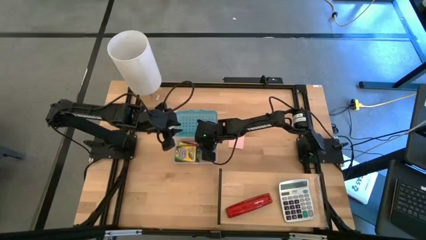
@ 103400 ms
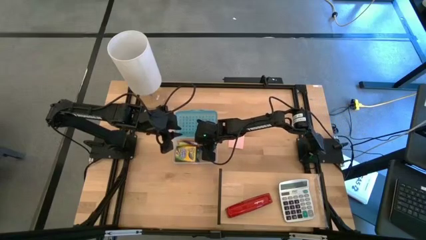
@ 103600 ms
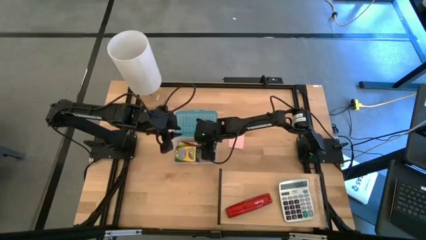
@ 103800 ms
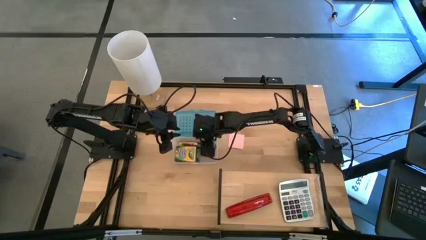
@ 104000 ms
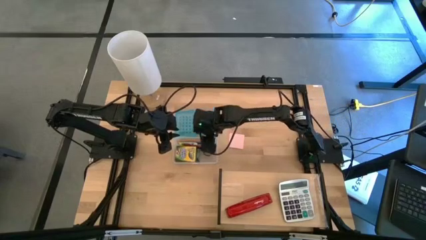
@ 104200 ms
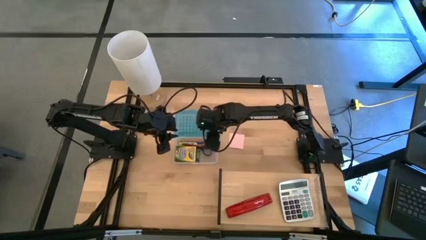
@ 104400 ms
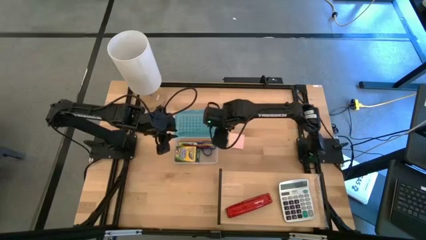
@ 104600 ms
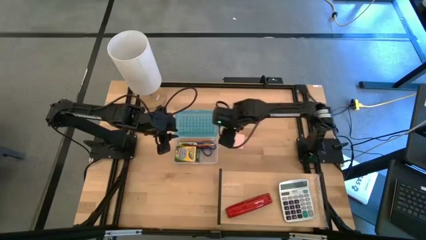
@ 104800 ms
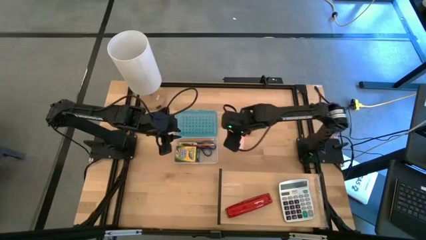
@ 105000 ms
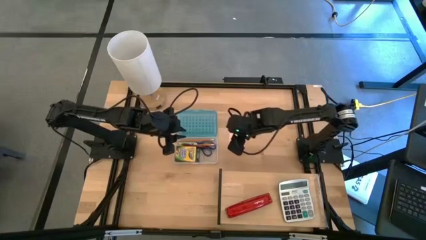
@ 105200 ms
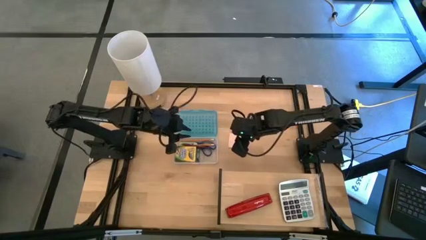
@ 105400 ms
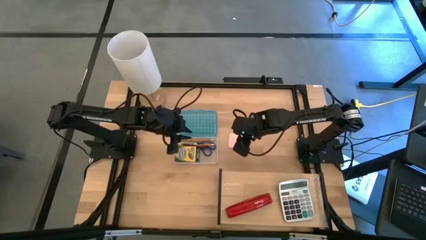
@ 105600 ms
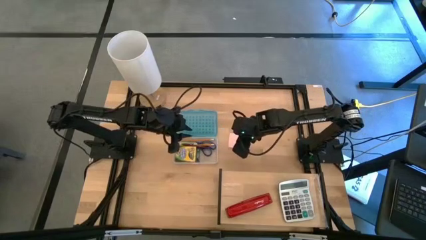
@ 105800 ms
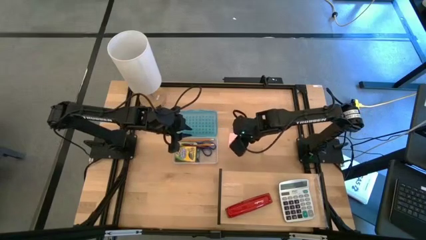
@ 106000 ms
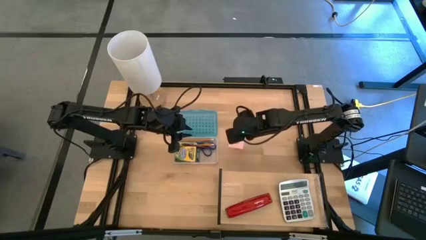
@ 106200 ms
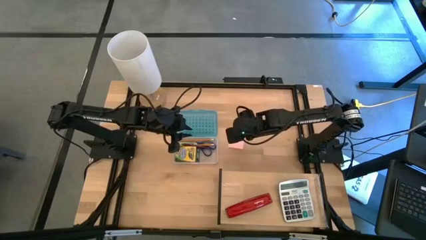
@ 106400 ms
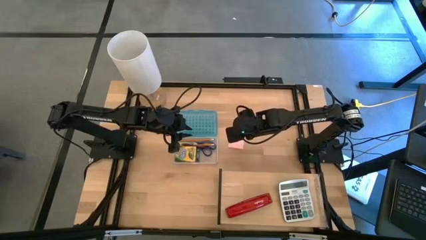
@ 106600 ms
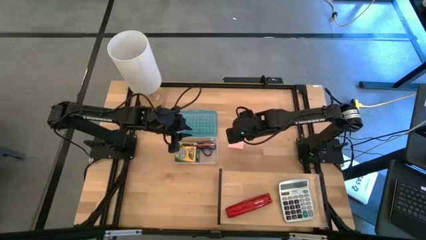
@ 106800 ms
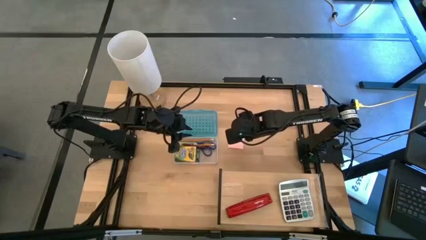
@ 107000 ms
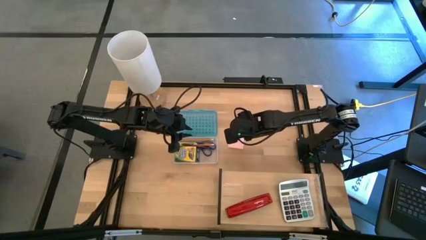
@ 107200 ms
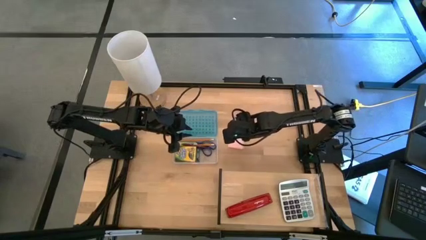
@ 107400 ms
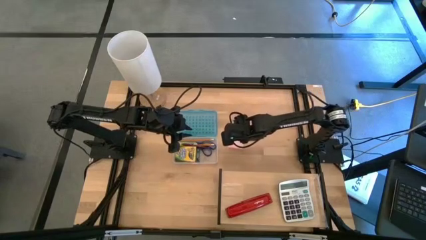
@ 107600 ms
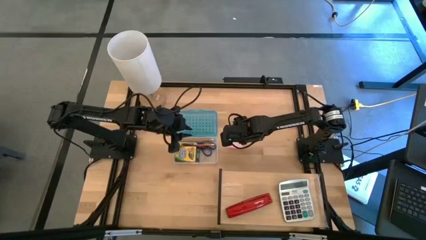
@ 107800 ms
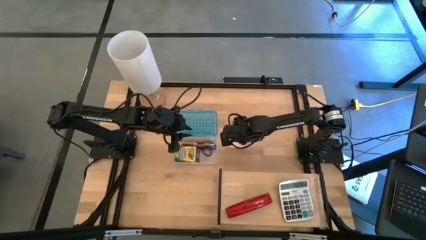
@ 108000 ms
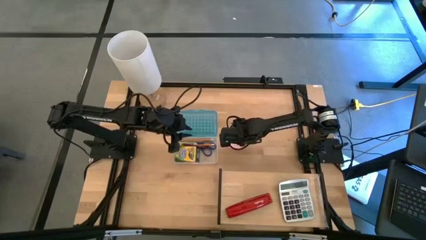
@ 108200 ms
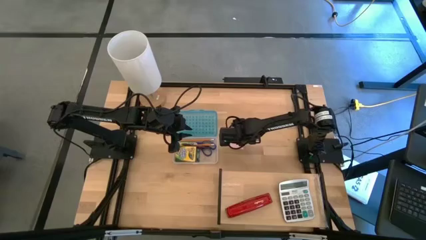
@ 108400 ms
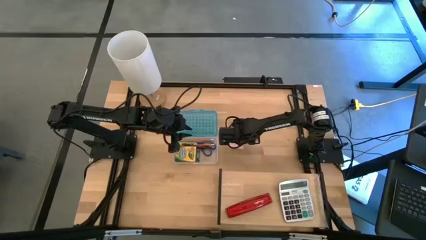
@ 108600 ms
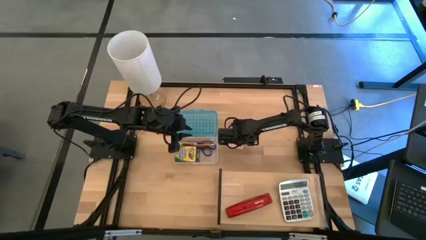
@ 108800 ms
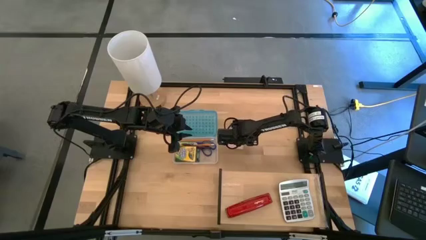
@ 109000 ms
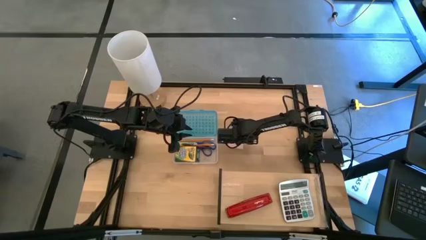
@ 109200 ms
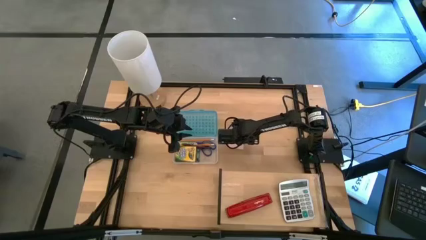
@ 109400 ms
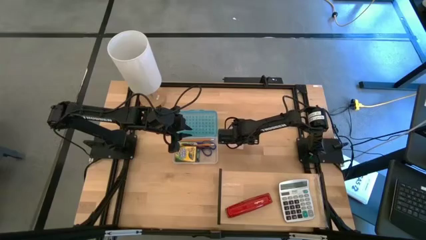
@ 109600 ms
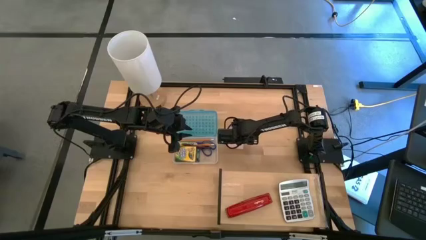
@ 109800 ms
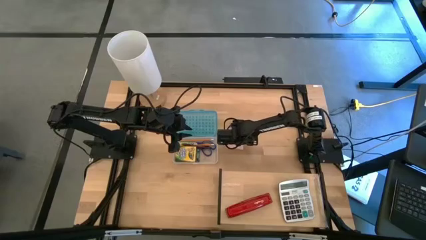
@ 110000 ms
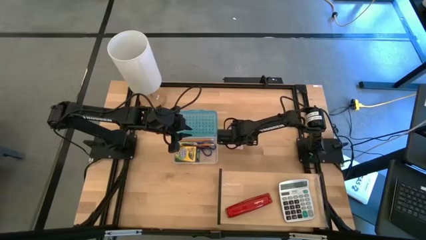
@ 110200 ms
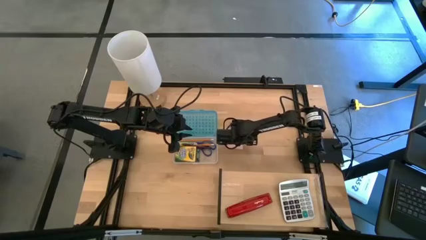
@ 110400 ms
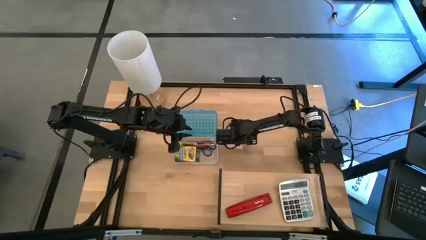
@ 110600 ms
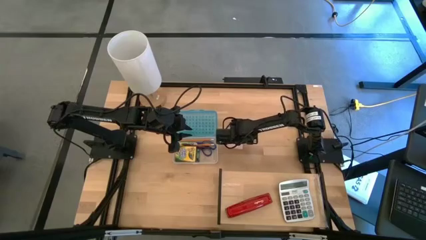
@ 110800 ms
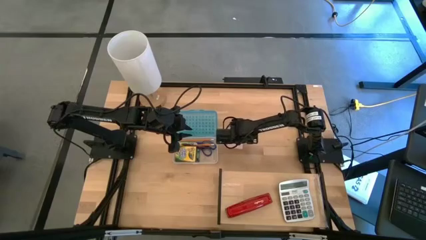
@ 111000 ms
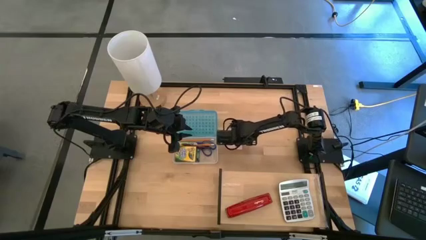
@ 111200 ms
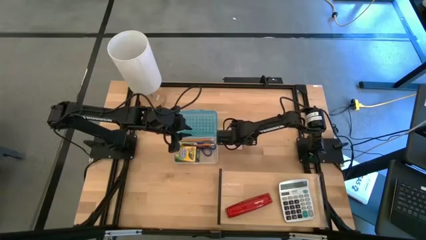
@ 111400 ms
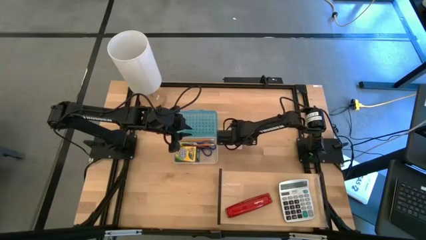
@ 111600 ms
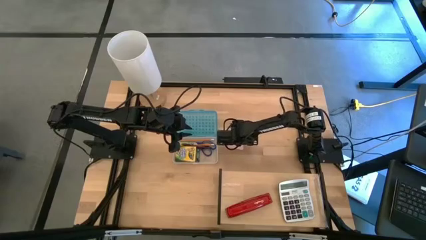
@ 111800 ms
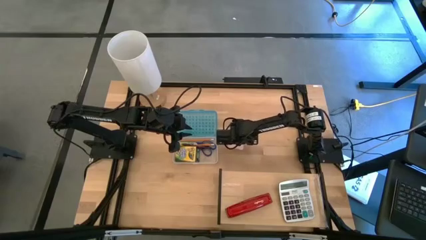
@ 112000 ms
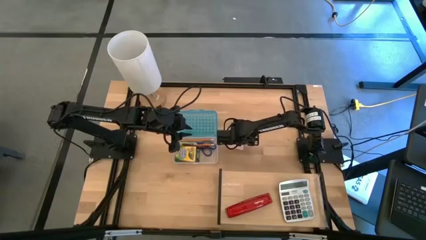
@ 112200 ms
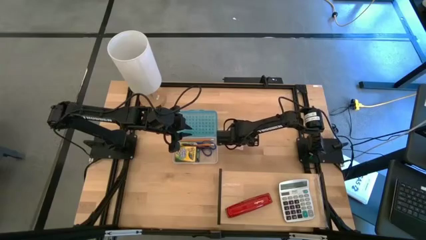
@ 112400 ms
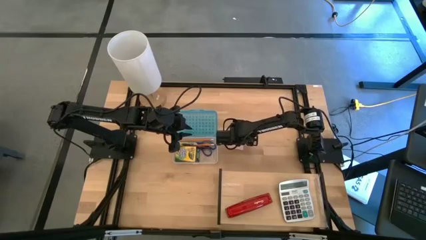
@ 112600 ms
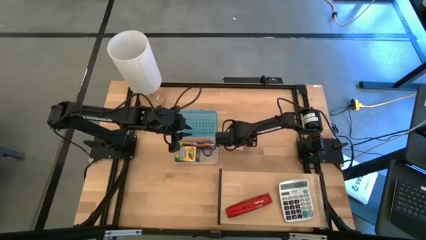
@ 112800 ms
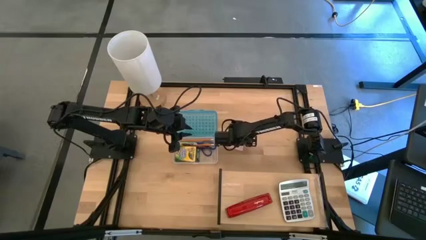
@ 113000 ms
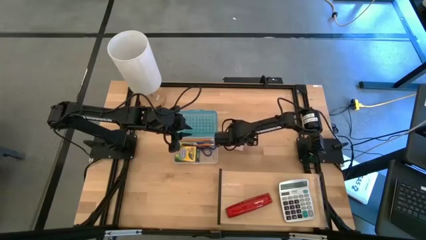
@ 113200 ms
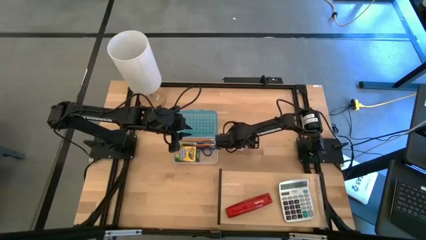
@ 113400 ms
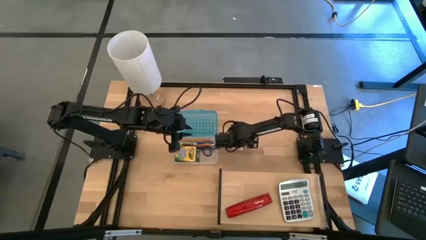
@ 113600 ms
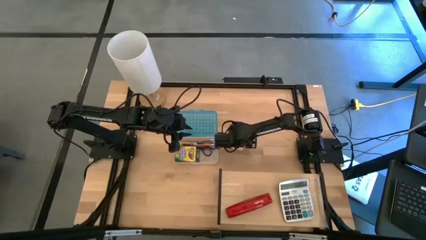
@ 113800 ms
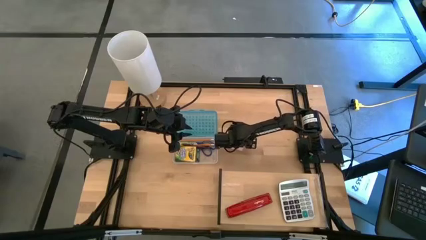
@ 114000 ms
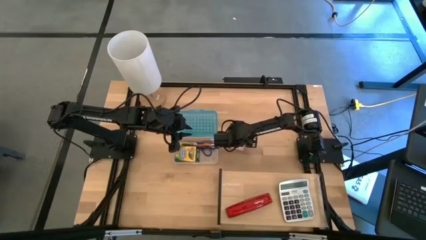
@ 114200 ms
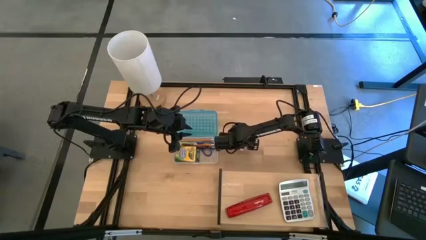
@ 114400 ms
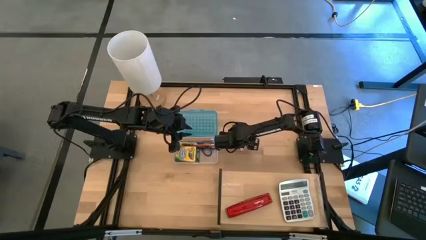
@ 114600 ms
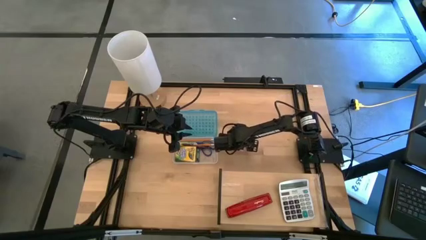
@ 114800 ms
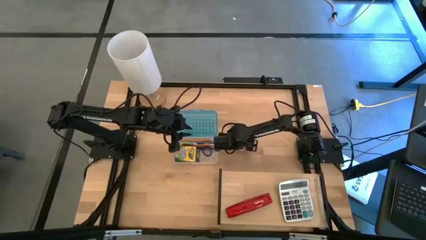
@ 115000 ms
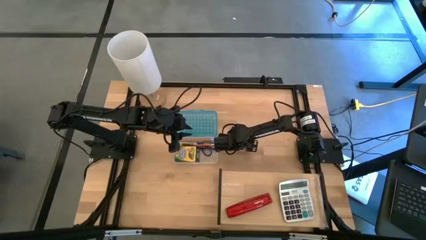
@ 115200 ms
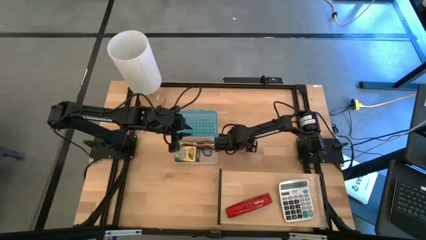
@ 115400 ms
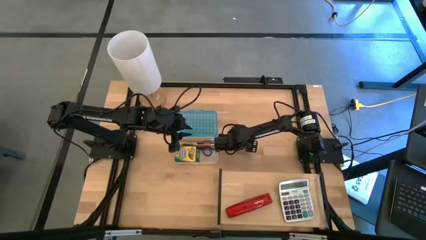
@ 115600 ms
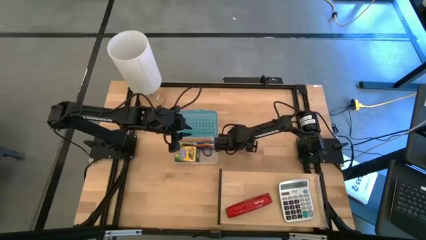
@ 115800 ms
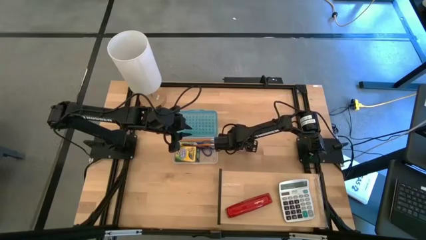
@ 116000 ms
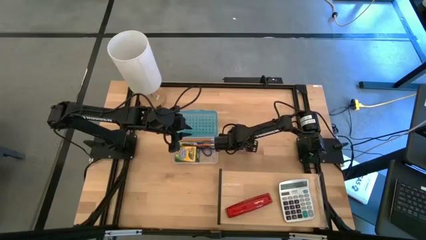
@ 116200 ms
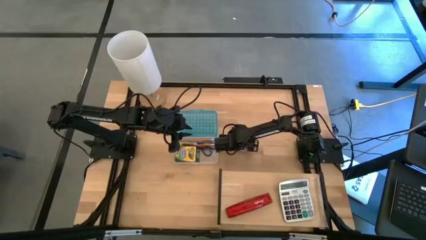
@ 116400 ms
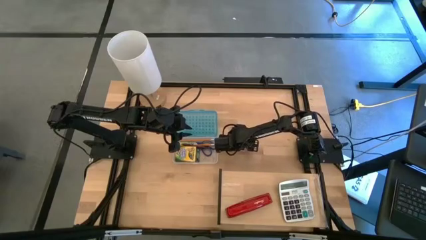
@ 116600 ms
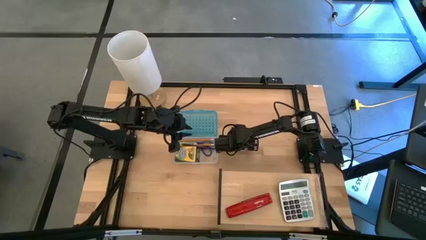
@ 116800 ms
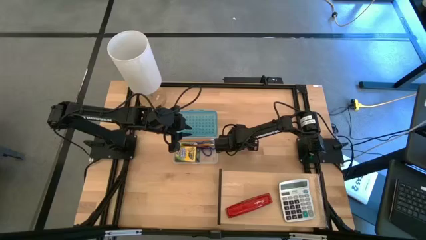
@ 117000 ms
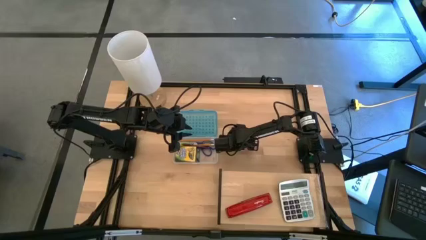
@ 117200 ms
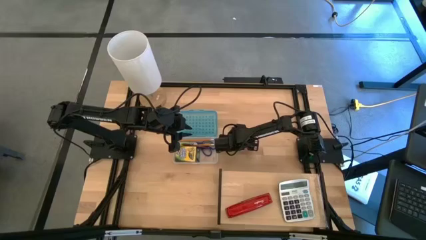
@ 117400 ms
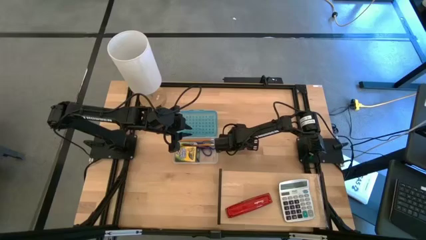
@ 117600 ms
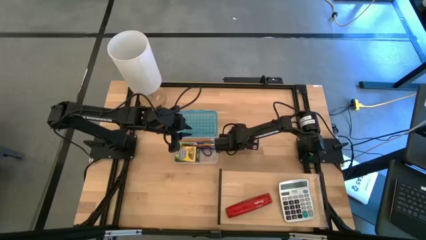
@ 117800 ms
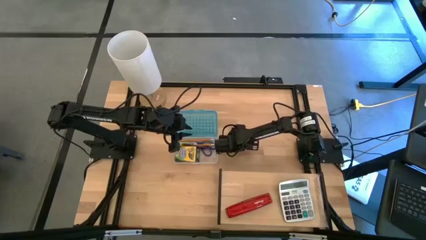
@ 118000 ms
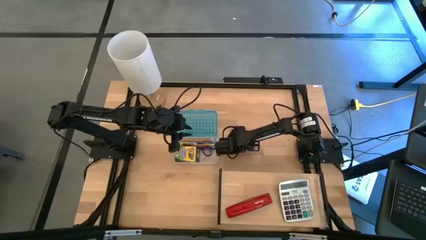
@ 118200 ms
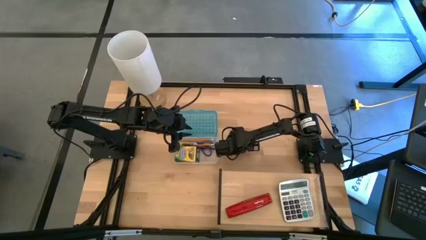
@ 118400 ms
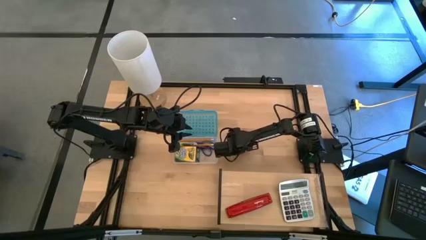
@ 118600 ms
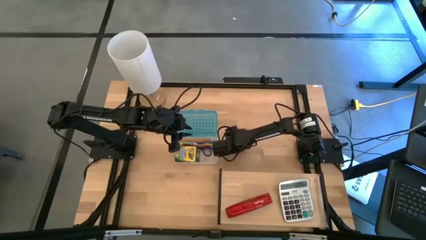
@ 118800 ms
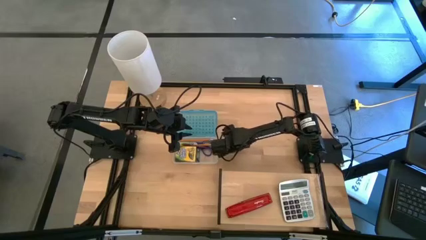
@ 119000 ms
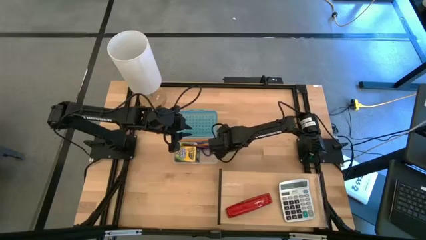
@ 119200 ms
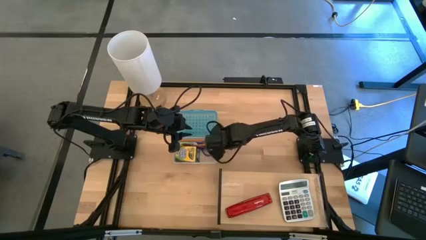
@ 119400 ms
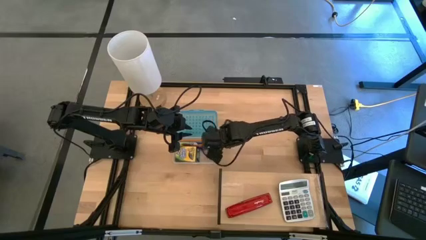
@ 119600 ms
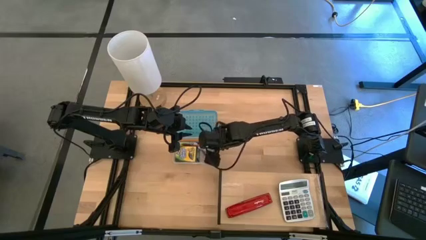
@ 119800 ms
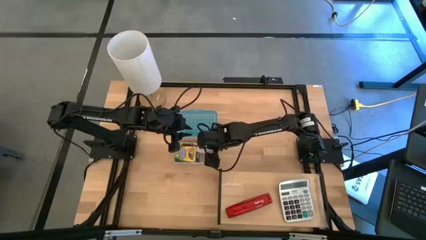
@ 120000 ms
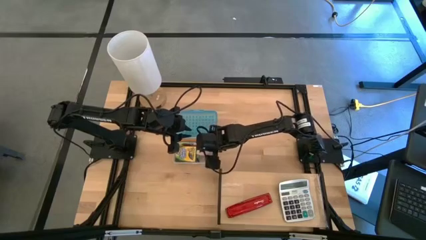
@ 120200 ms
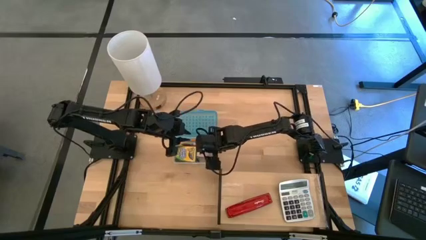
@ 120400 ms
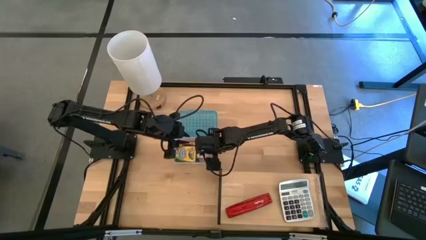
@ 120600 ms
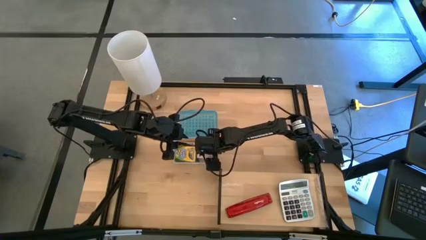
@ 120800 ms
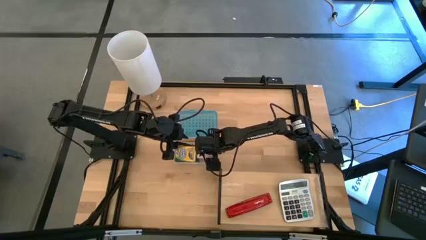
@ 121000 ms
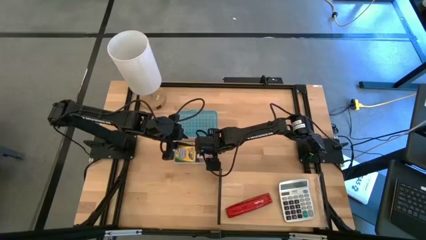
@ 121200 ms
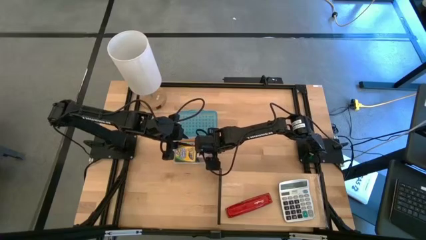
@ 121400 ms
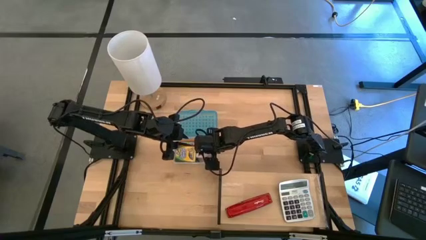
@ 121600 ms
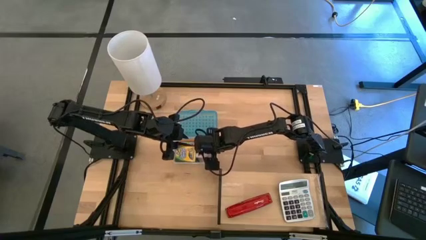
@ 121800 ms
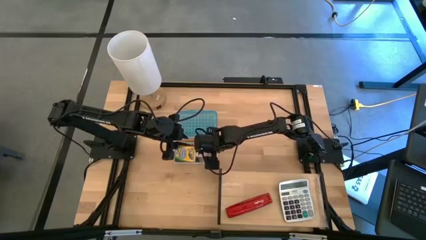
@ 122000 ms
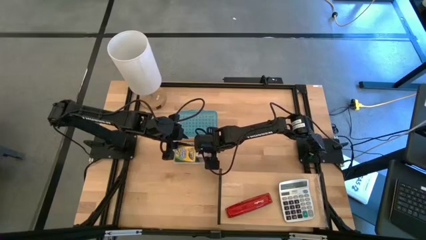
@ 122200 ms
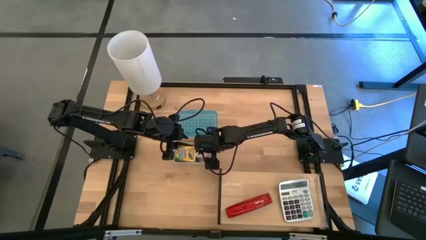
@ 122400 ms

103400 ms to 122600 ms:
Task: Pack school essentials
Put the pink sticky notes into the blue supply box
